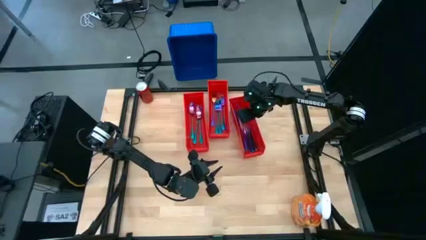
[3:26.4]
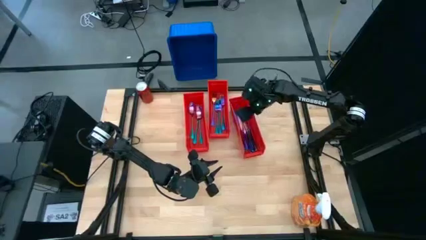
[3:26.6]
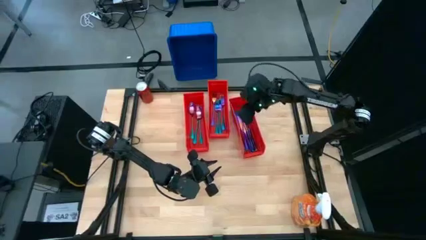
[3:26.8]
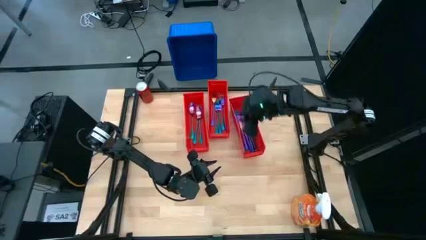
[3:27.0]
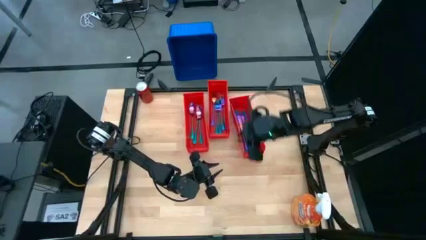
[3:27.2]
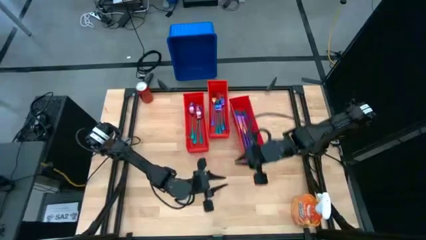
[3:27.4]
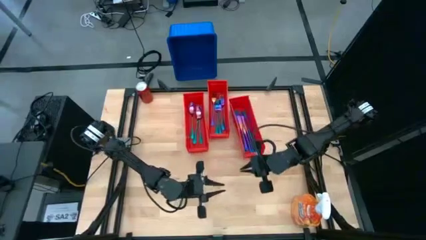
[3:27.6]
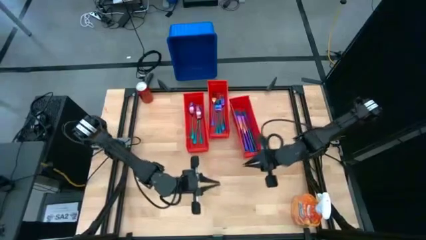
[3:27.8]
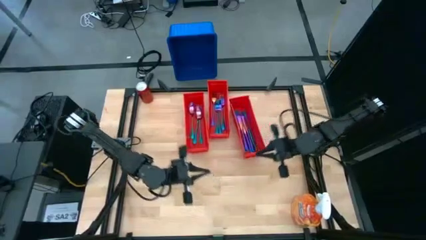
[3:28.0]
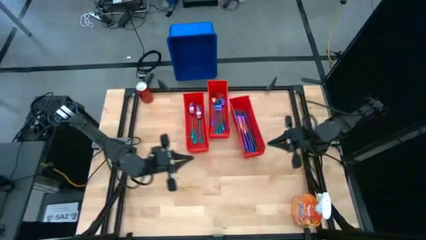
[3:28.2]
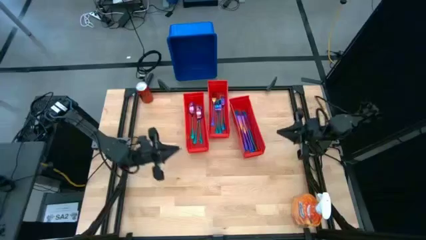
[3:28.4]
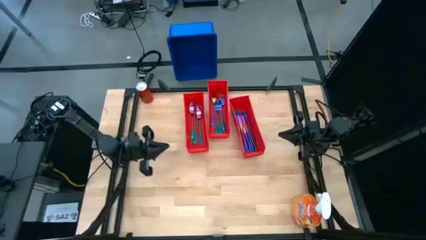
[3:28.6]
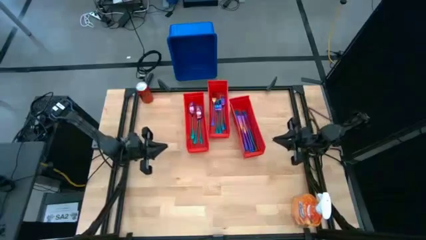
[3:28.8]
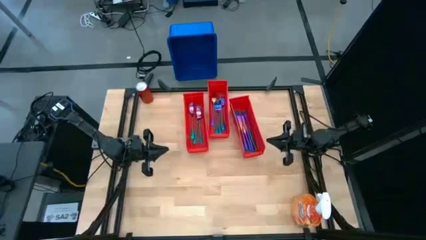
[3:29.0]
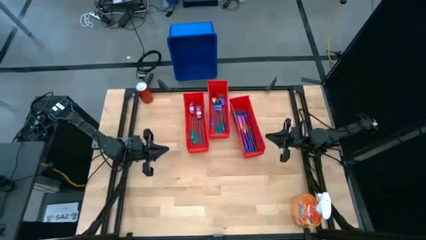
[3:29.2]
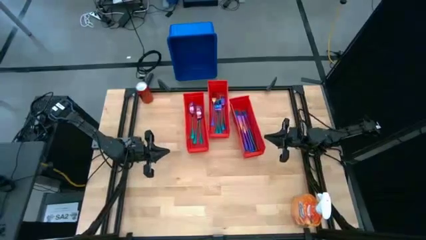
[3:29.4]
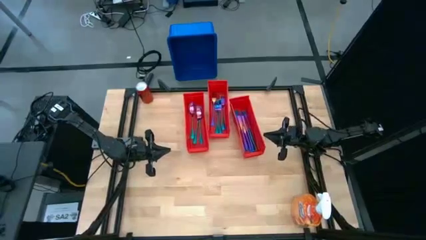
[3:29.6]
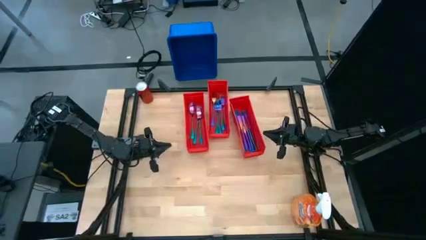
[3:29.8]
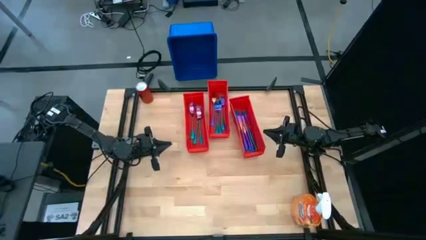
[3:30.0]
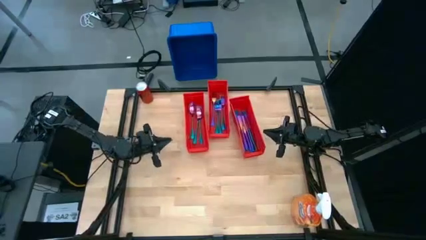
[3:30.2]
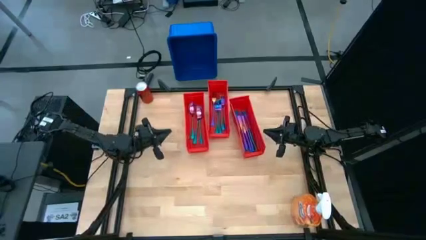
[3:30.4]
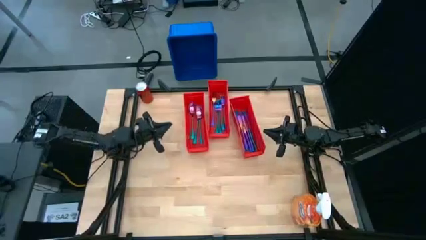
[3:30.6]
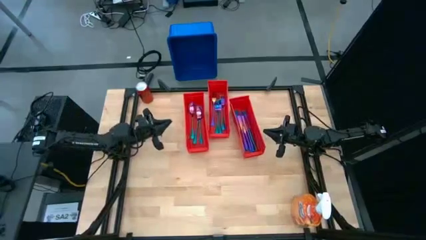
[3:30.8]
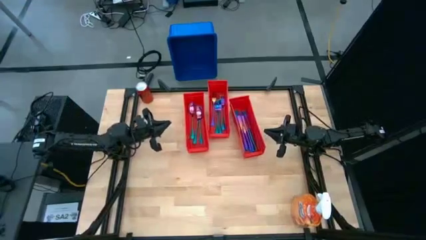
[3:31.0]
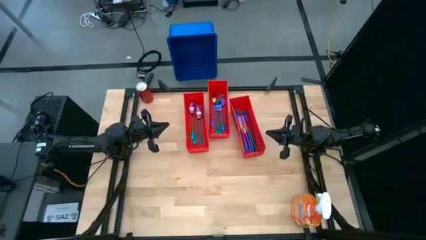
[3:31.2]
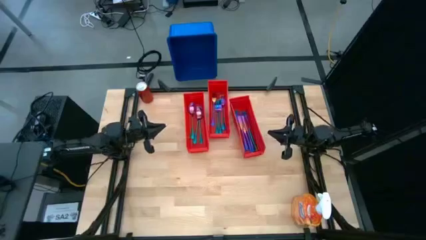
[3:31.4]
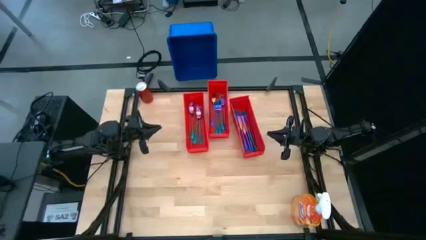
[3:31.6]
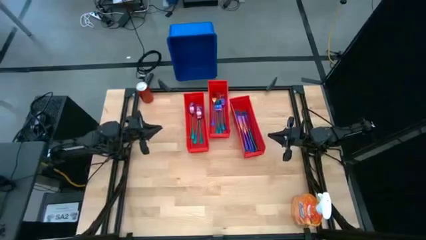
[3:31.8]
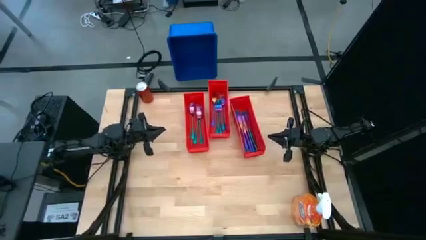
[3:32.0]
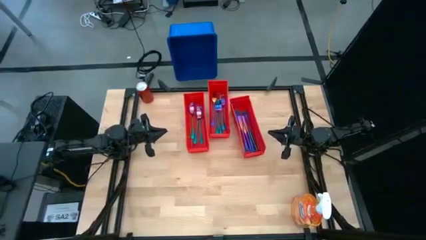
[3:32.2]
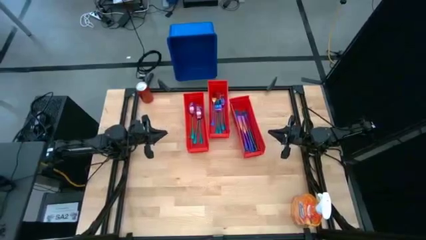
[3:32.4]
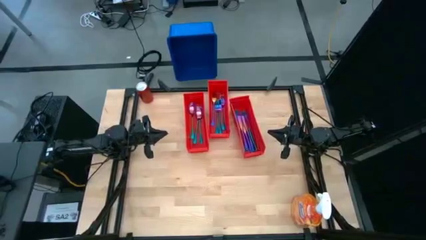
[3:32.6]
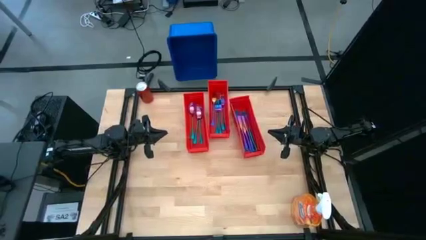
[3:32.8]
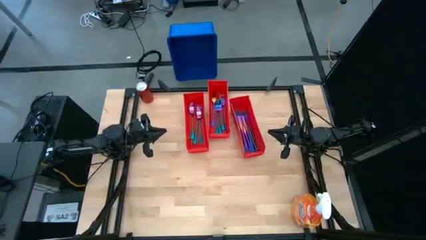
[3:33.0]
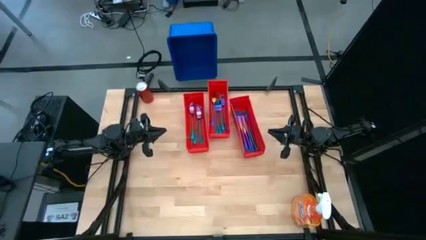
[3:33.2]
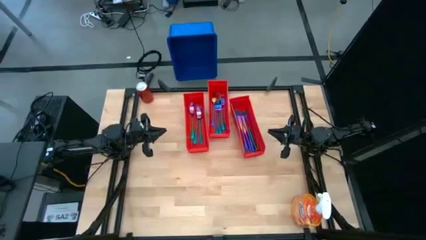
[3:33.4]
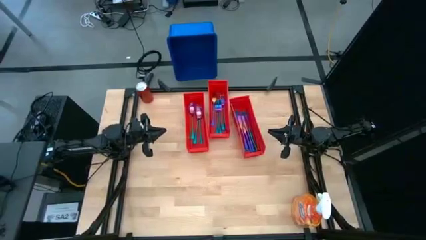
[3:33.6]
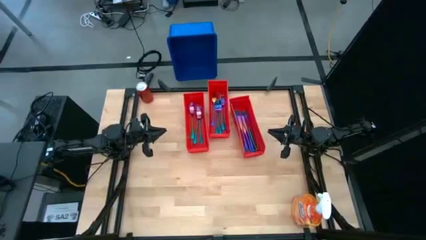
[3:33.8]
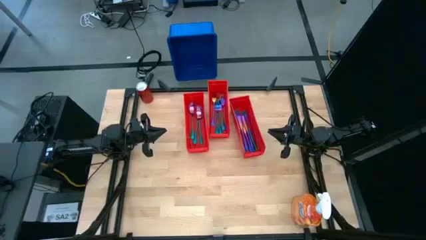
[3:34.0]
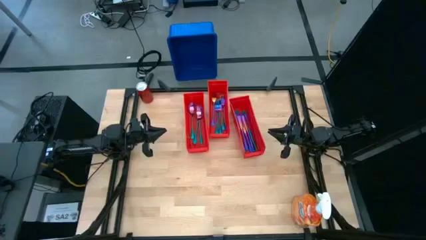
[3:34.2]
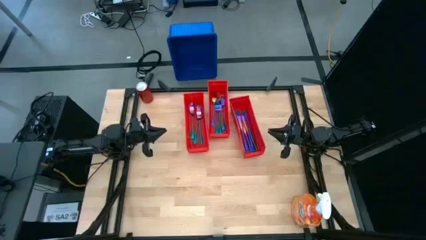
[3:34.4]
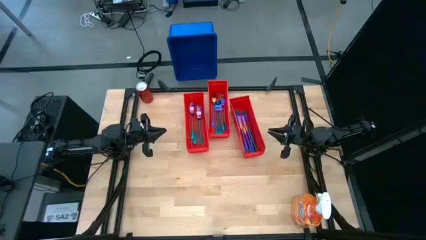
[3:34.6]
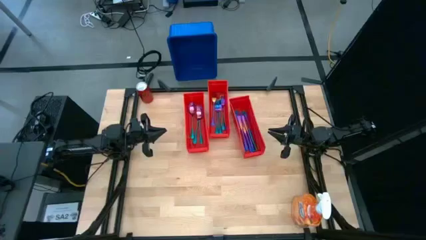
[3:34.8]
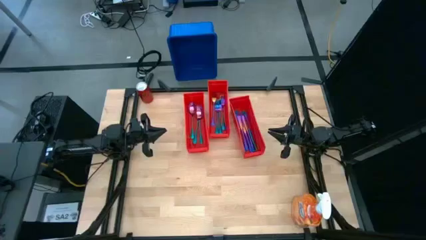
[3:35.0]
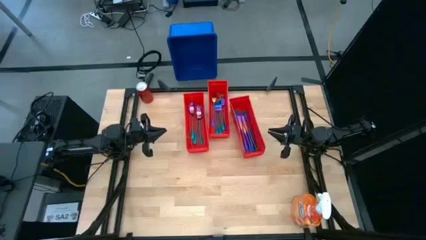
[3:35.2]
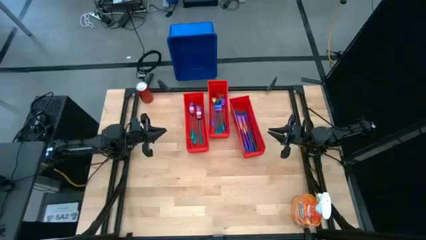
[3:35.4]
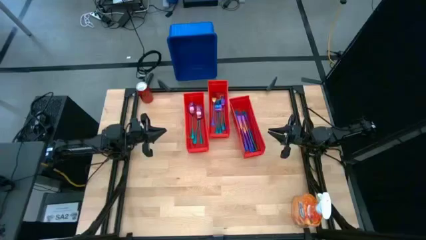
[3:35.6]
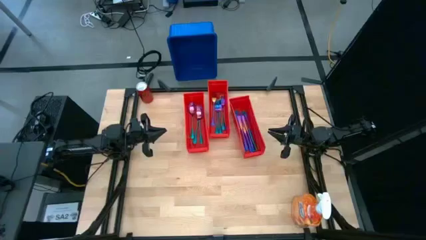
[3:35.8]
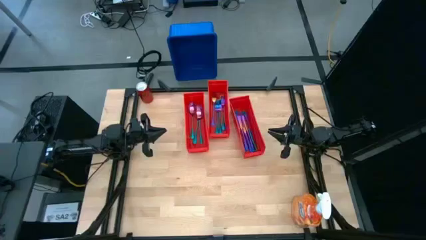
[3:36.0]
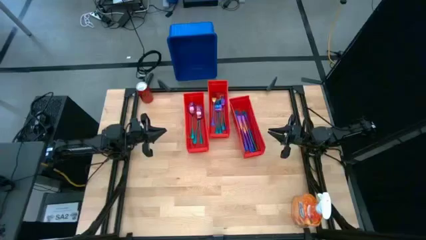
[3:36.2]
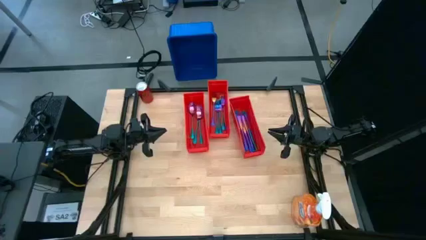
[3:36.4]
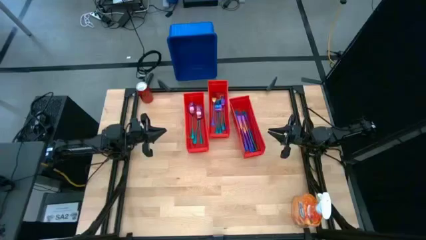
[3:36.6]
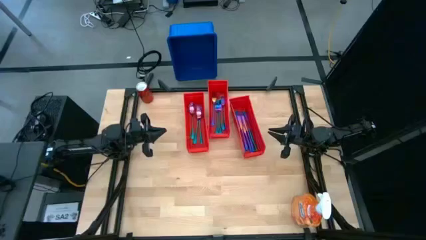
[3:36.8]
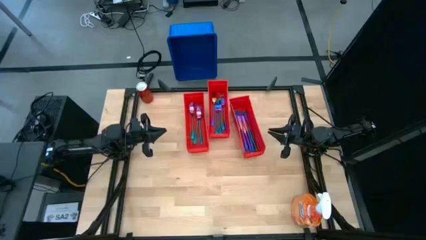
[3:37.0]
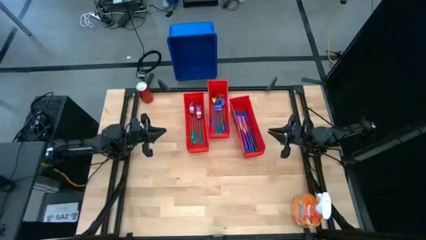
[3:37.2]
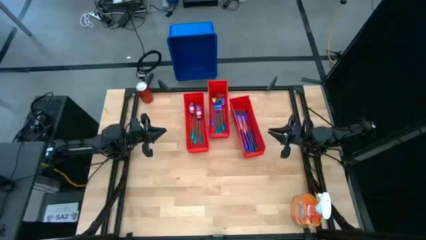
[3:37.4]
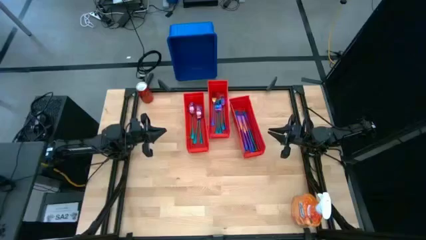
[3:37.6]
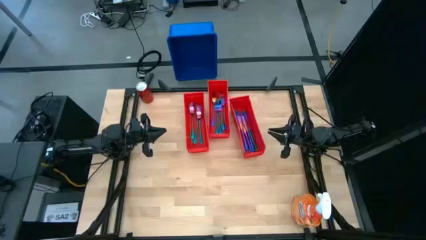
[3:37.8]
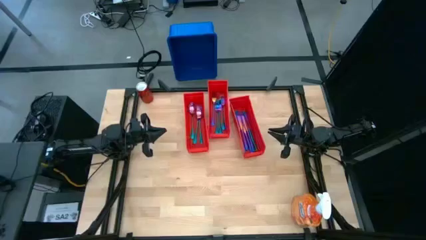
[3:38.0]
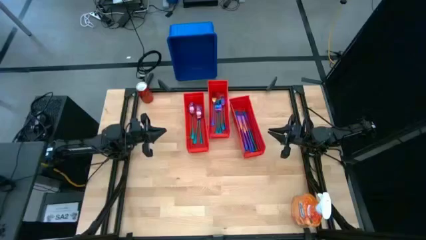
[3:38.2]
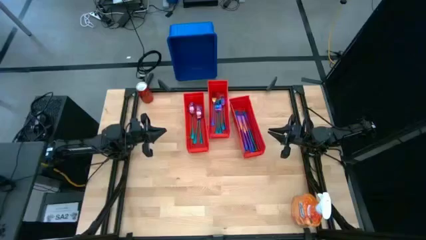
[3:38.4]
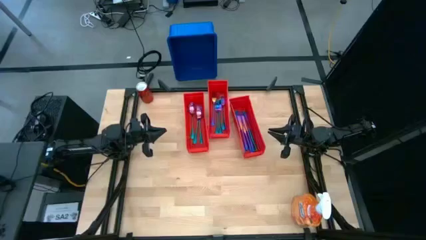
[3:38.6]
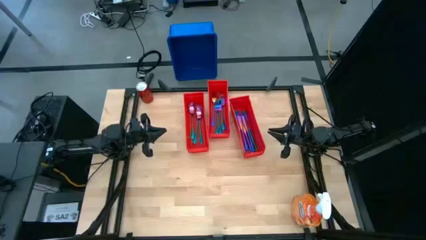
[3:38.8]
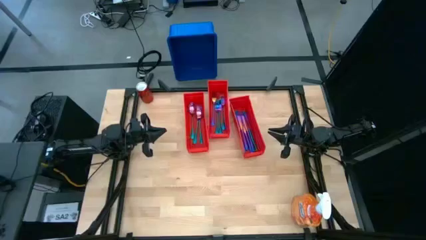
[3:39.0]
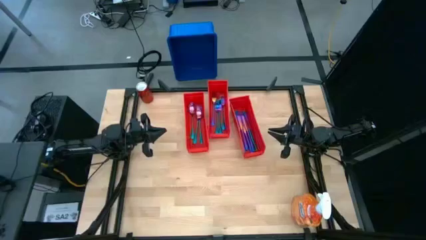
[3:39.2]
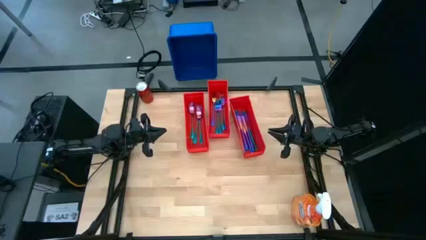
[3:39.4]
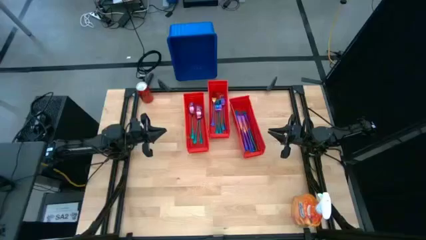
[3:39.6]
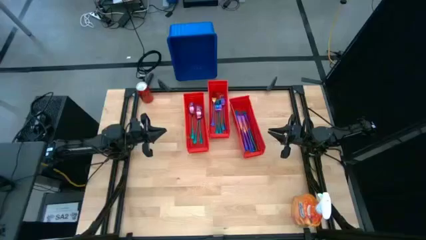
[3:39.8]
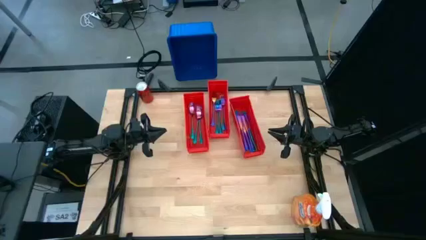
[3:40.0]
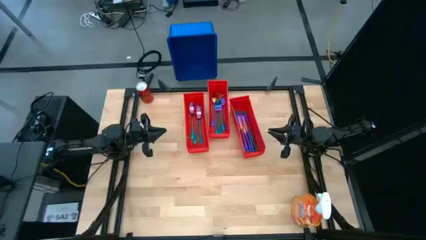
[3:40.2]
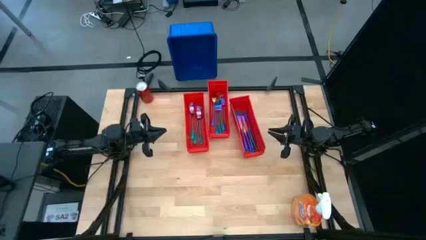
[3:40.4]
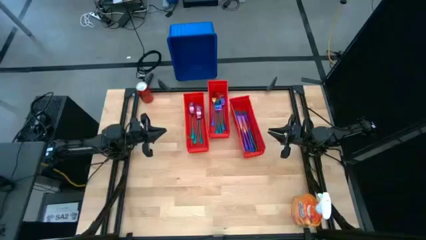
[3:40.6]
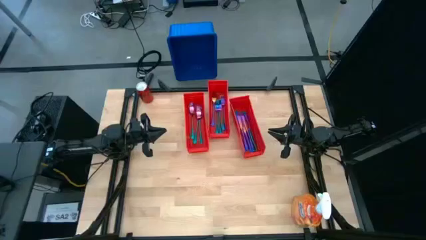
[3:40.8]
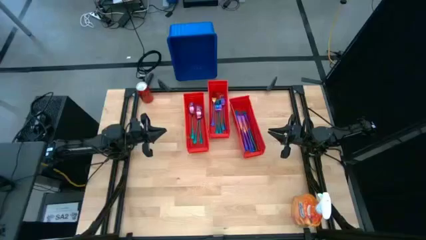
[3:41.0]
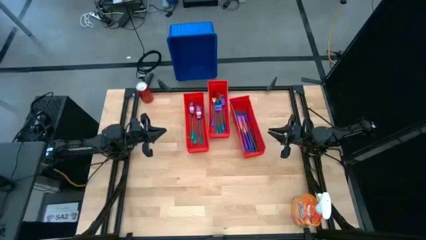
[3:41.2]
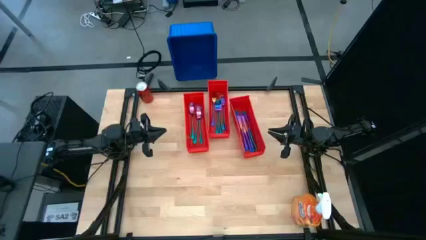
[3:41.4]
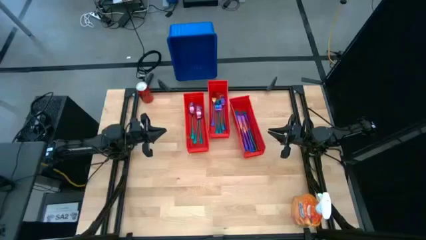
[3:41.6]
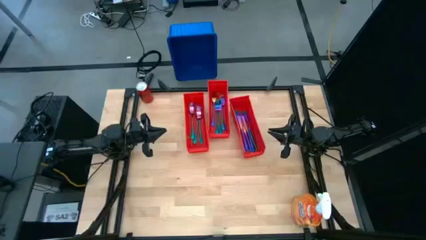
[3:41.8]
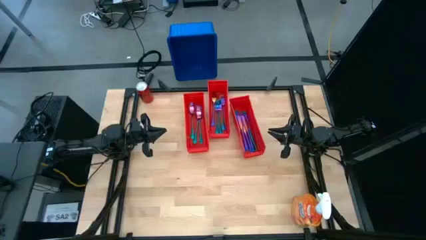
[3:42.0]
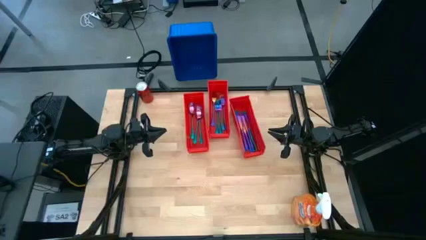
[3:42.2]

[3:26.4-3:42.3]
Task: Sort silverware
Return to Home Position
